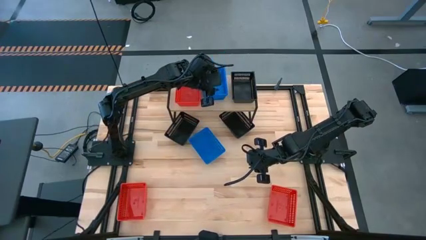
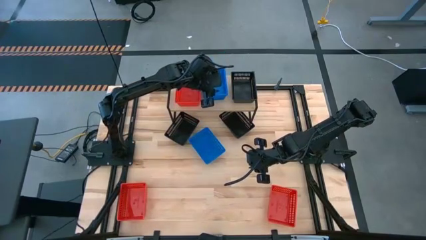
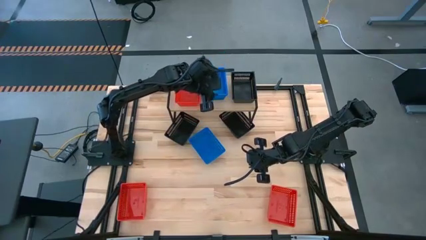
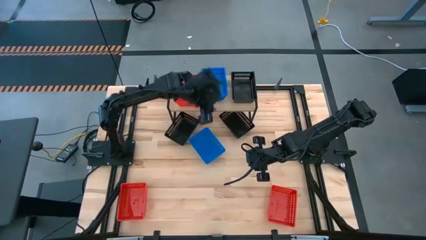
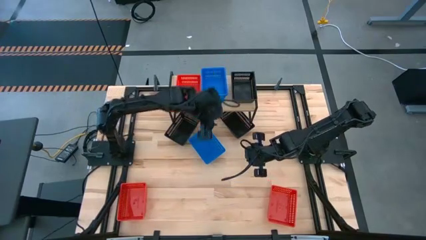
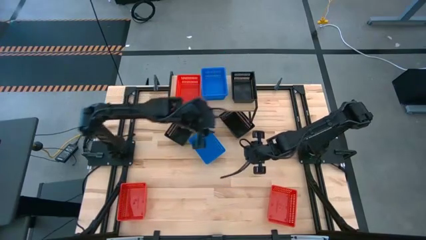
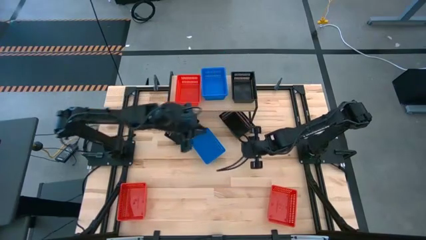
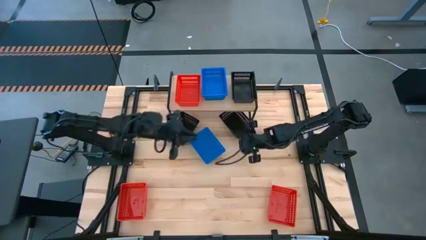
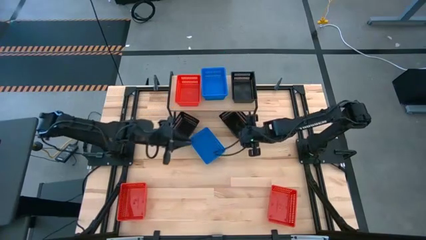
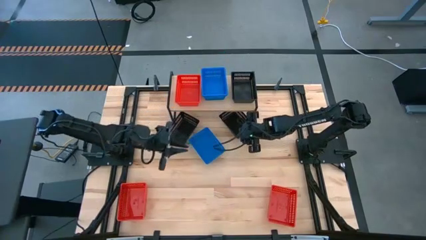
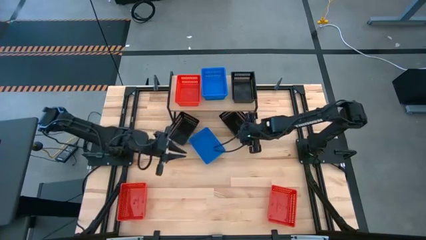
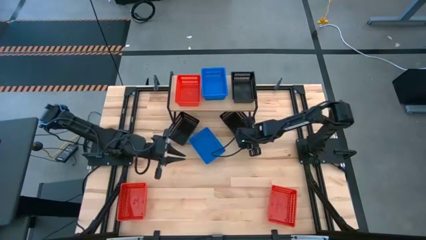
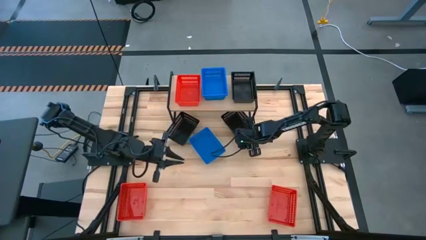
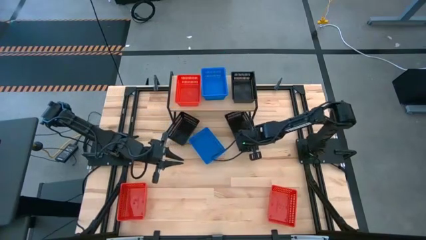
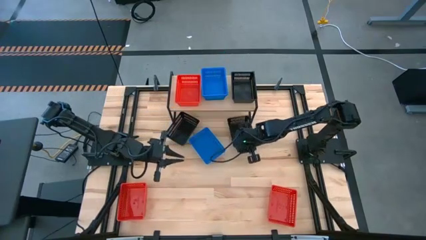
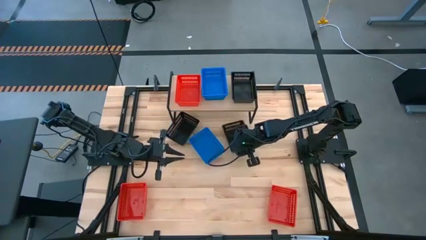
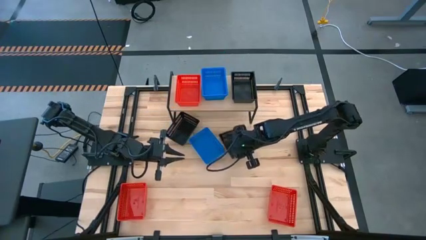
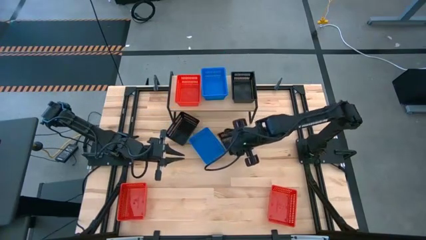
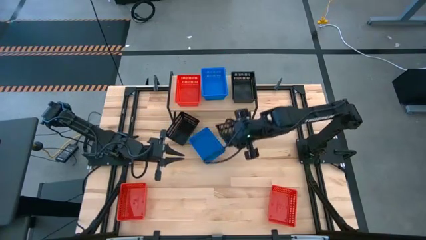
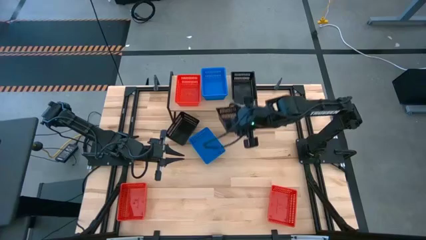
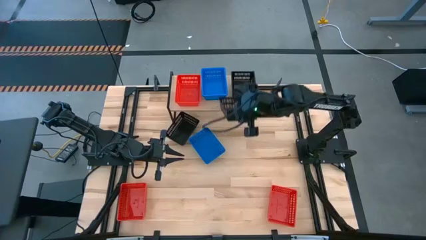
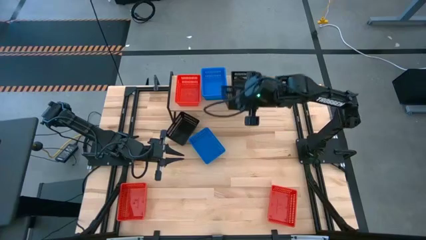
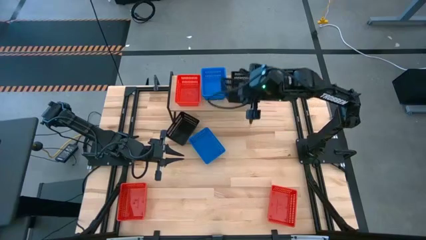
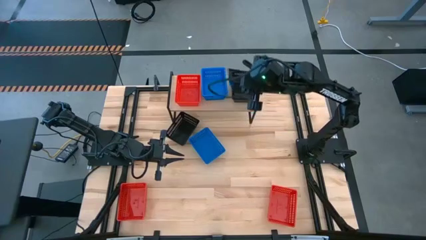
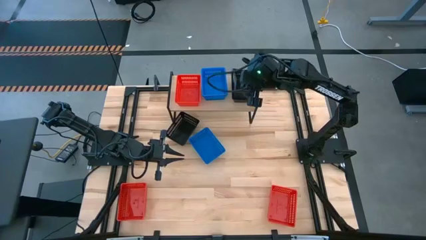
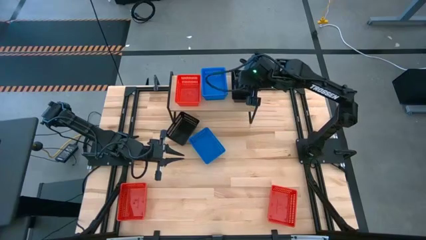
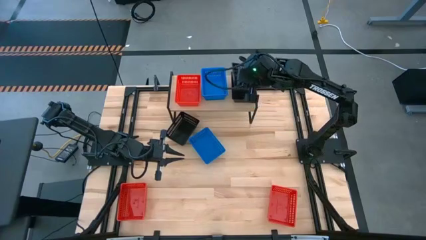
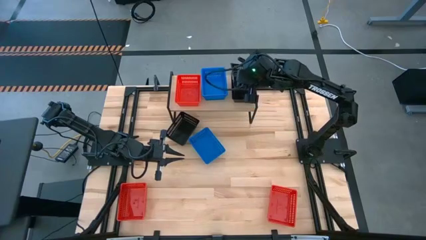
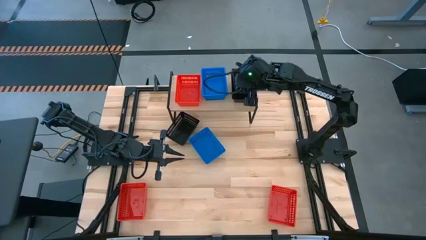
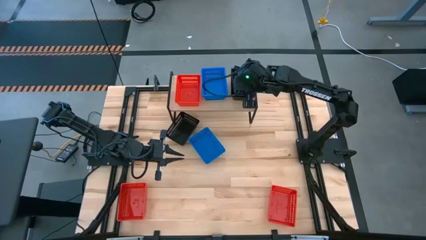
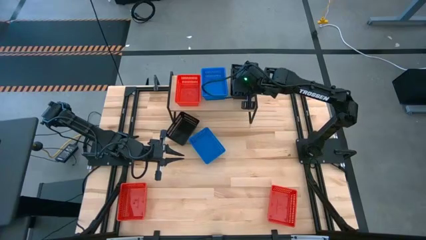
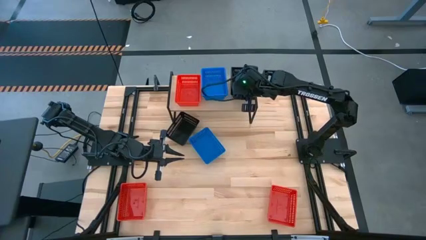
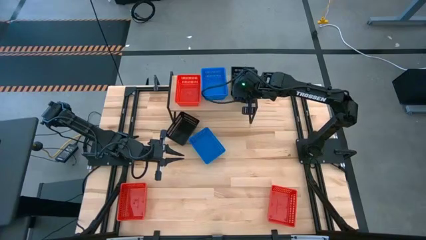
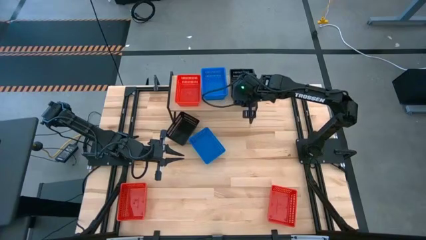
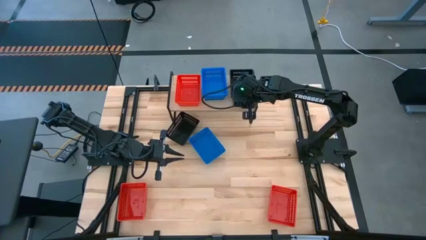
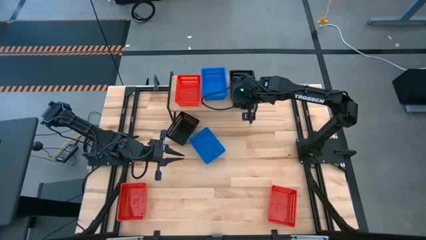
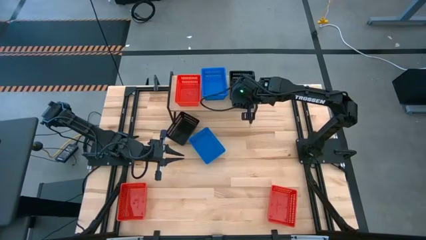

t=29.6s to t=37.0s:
Task: Stack baskets on shelf by color
Stack the right black bin on top of the black bin on the shelf

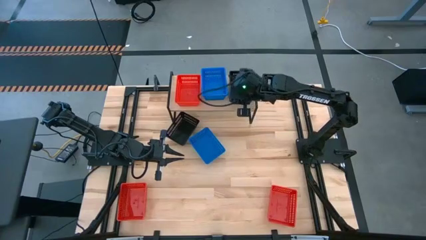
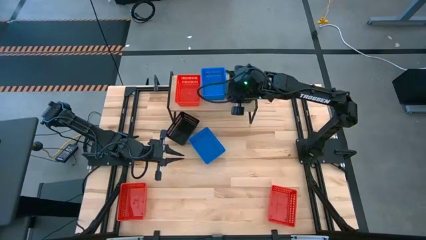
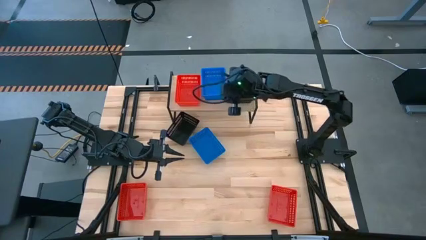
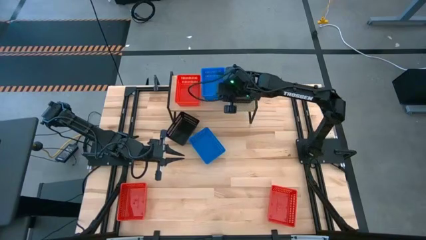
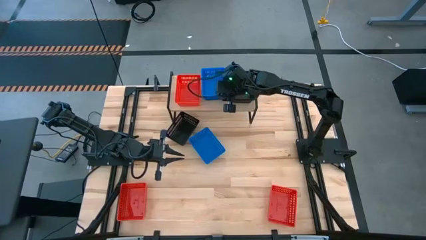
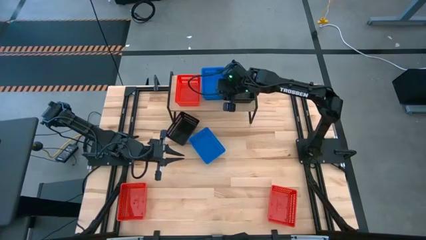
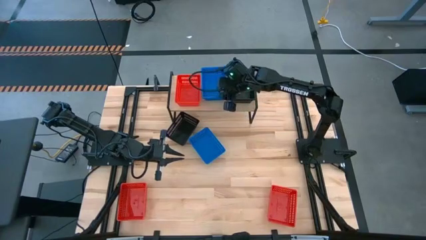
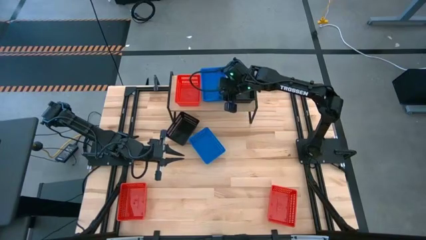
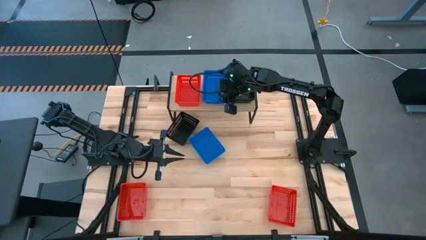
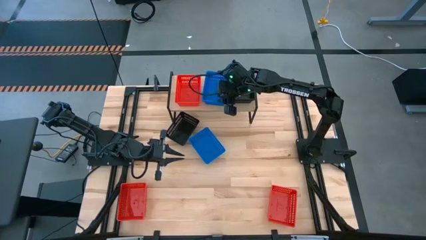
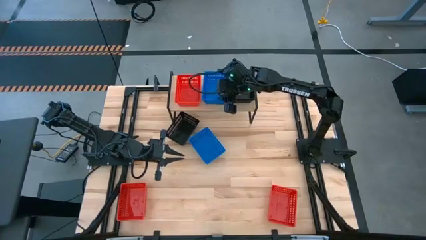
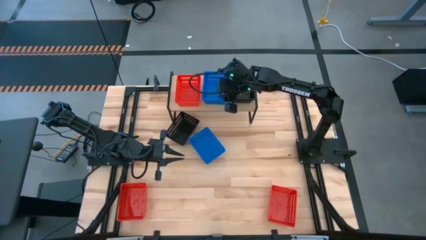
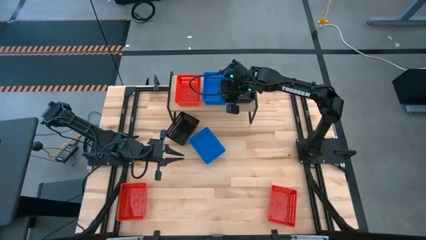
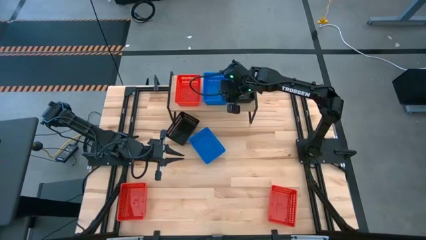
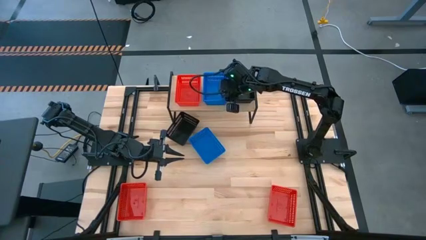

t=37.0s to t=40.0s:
Adjust the blue bin

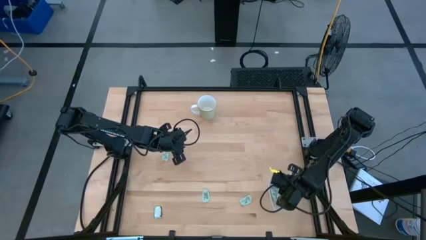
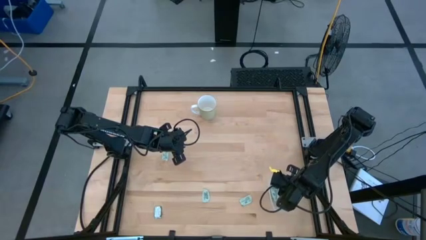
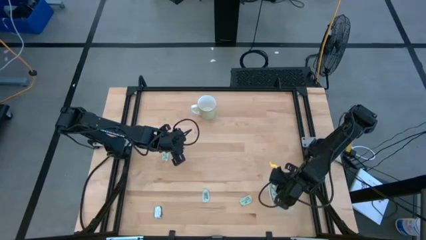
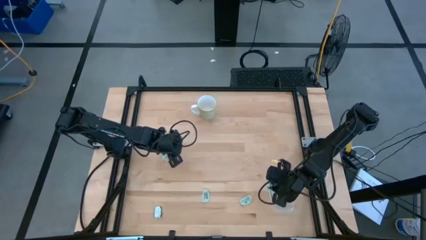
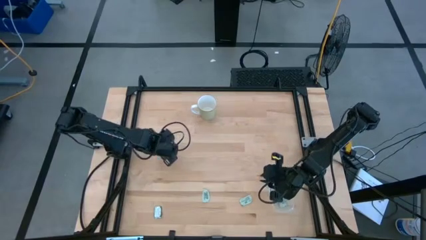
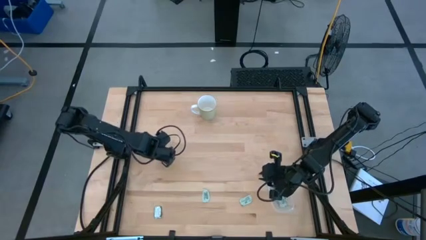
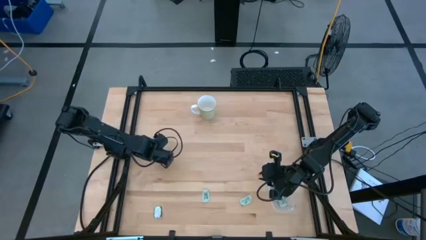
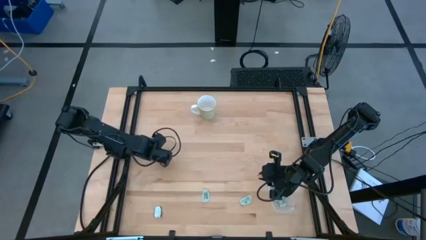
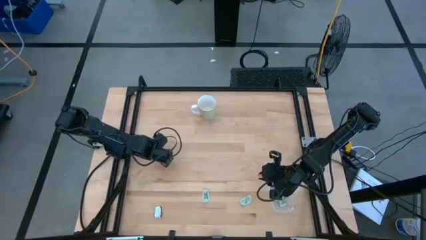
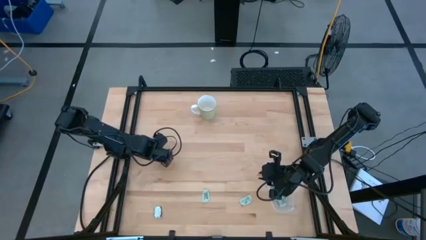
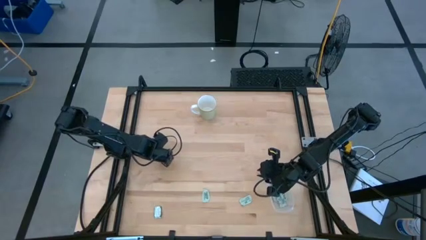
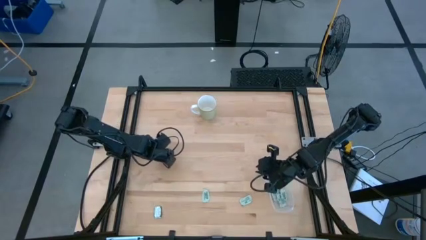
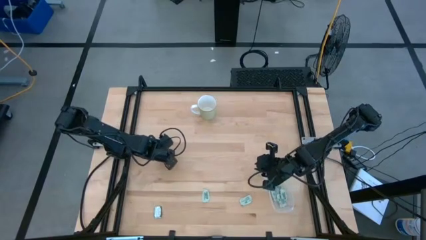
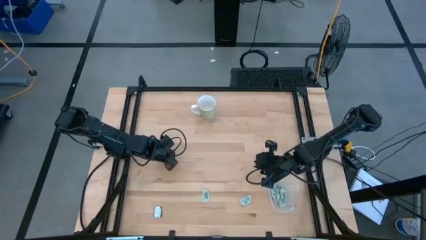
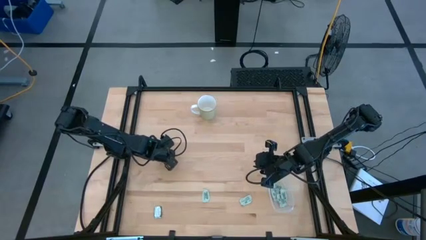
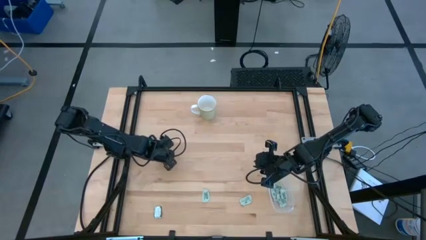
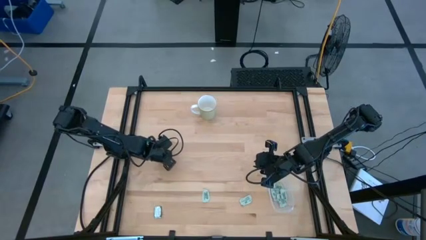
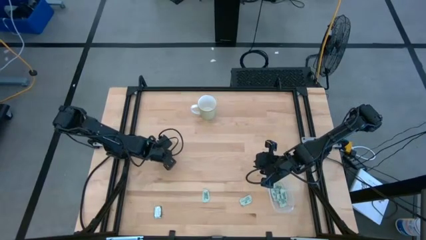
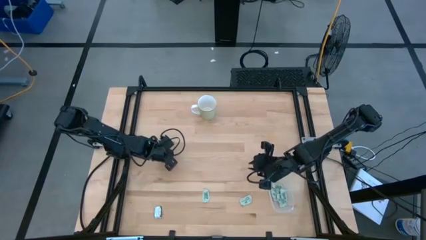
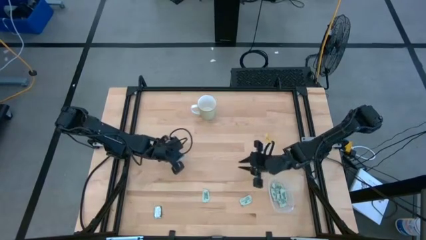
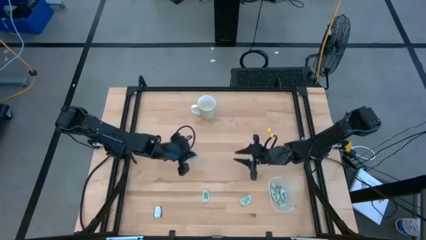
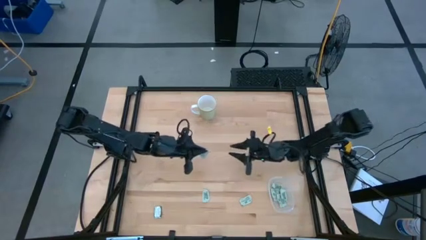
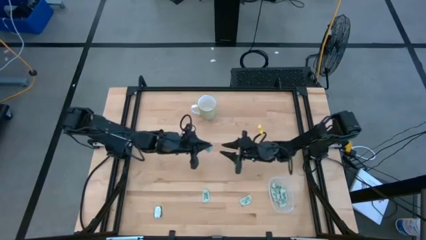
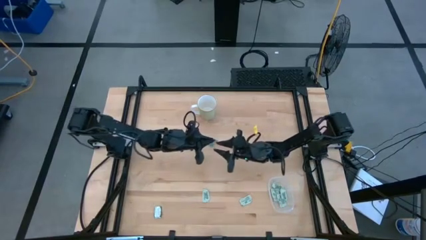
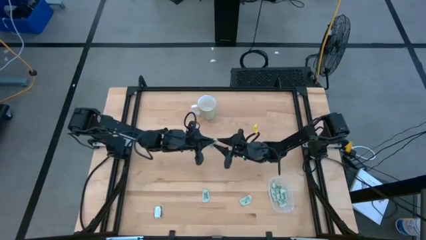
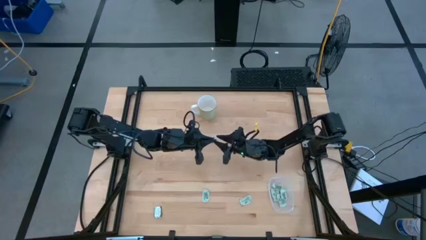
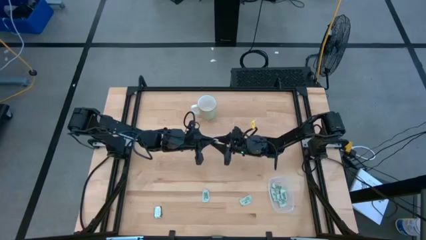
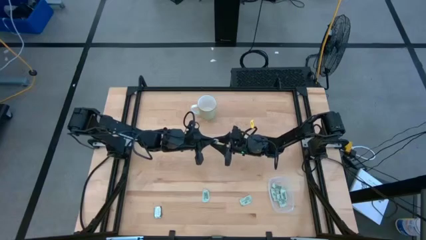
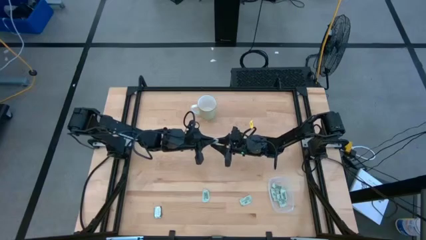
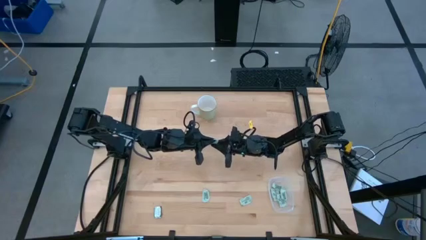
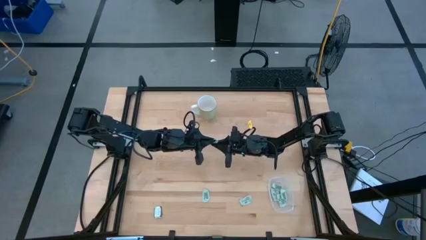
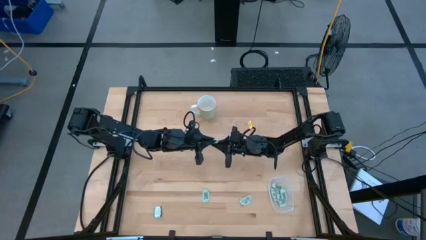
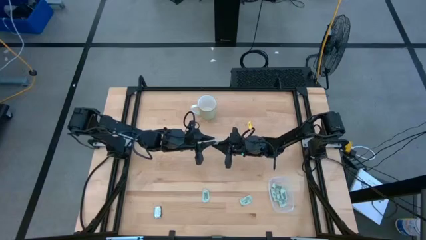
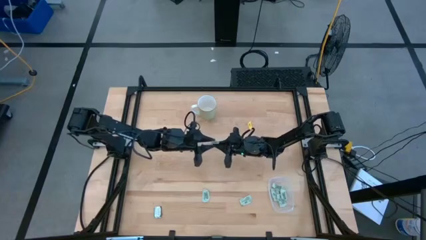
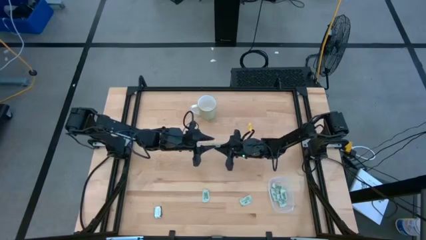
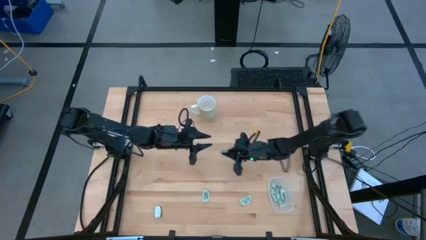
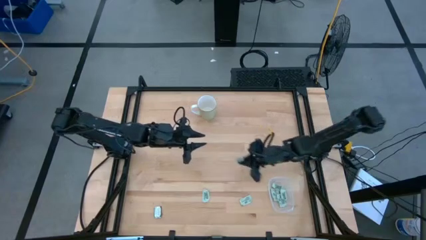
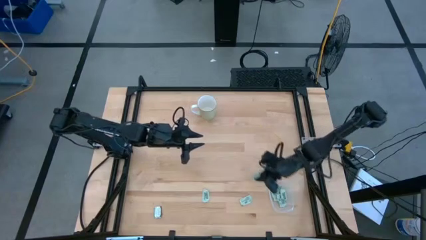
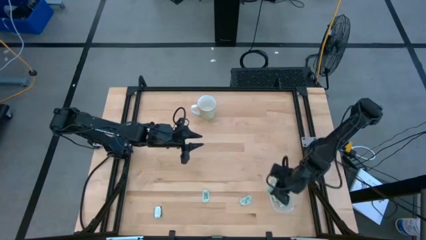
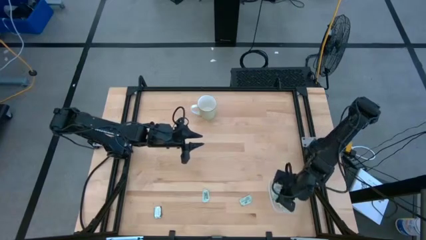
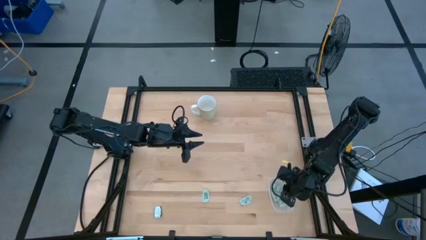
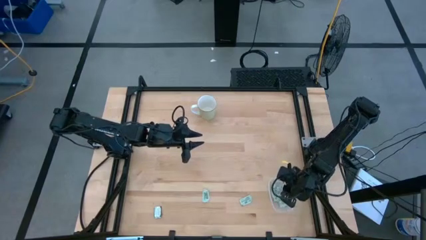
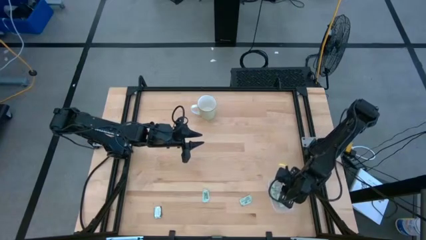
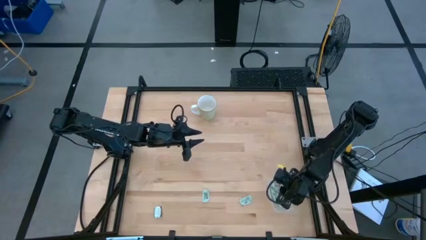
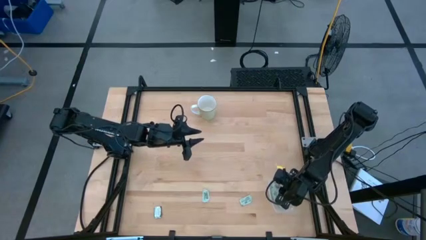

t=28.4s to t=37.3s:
Task: Pick and place Stevia / Truvia into bins
Put the stevia packet into the transparent bin
